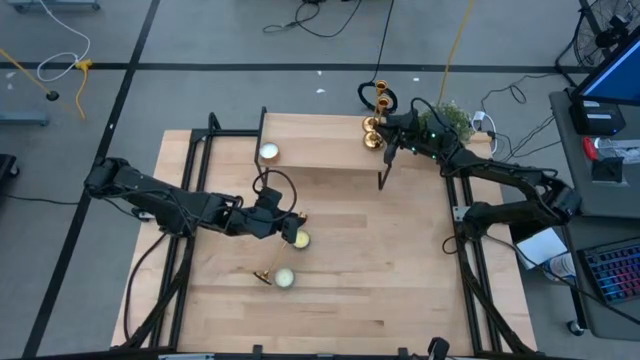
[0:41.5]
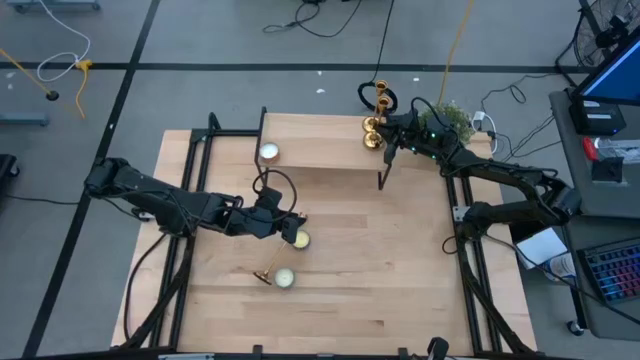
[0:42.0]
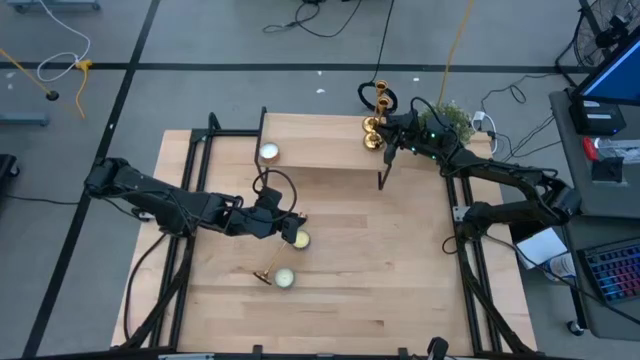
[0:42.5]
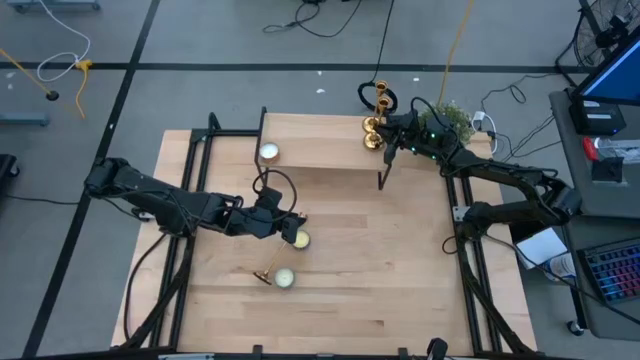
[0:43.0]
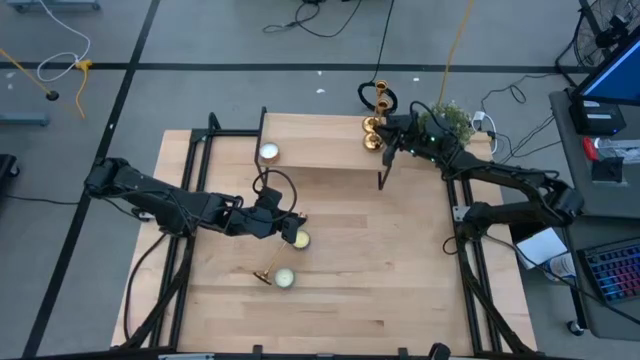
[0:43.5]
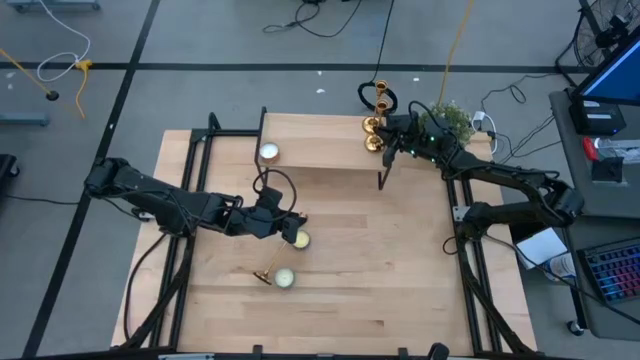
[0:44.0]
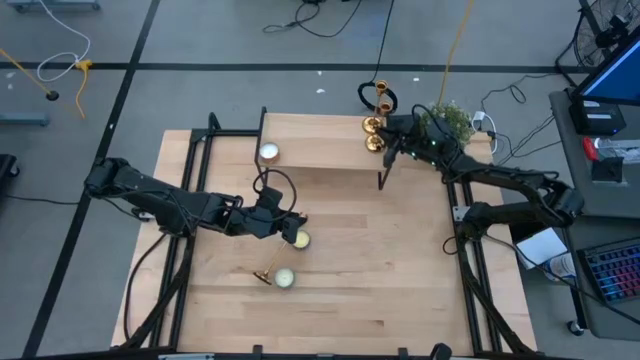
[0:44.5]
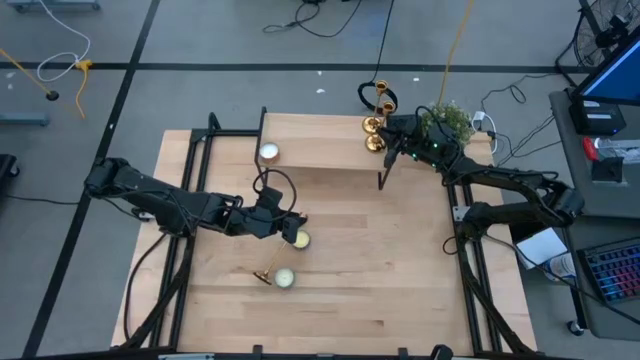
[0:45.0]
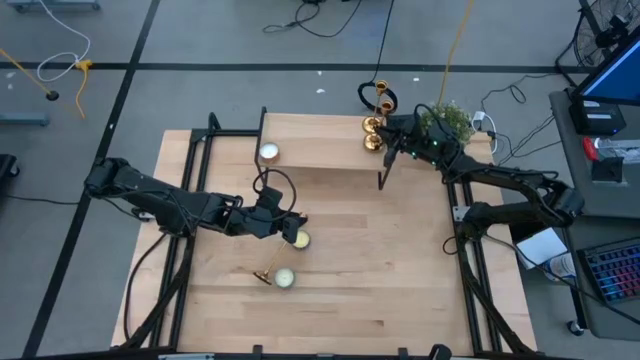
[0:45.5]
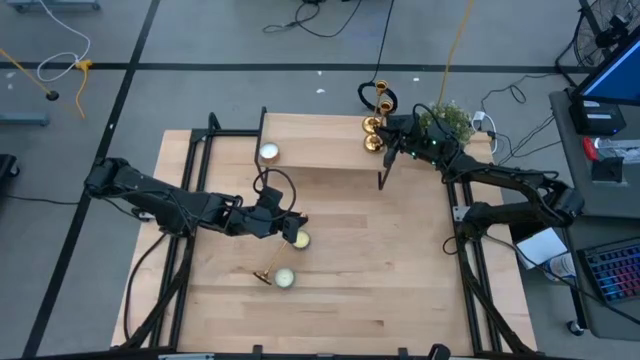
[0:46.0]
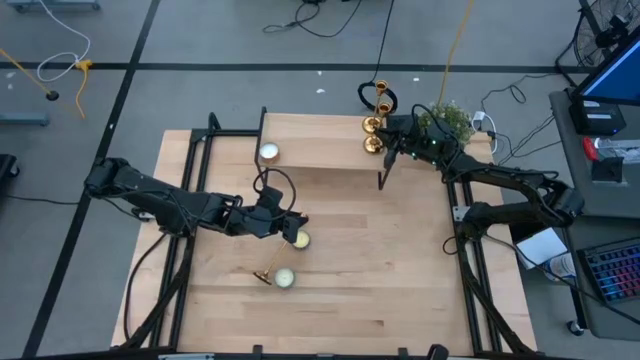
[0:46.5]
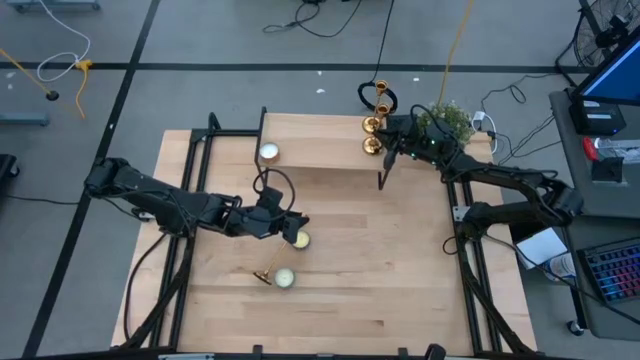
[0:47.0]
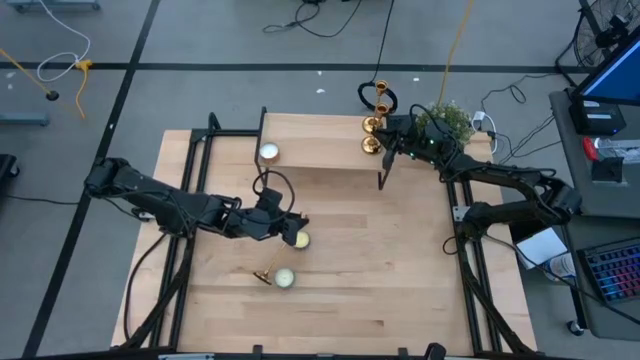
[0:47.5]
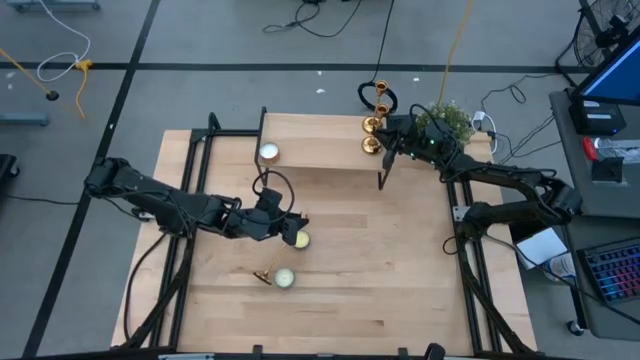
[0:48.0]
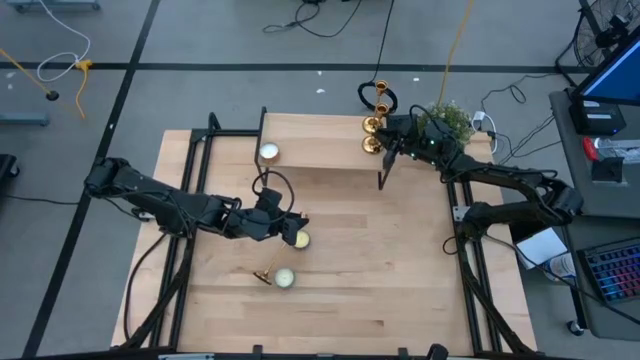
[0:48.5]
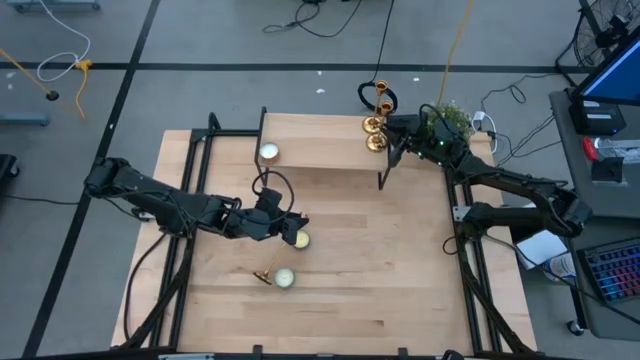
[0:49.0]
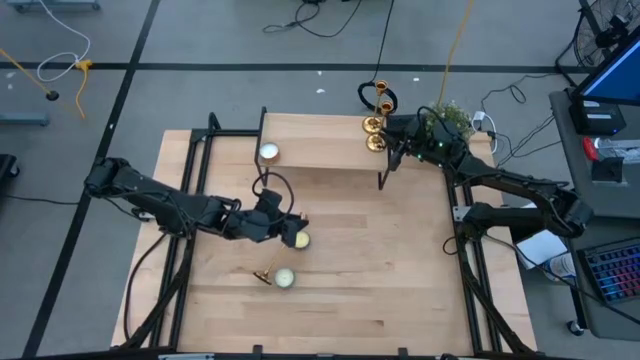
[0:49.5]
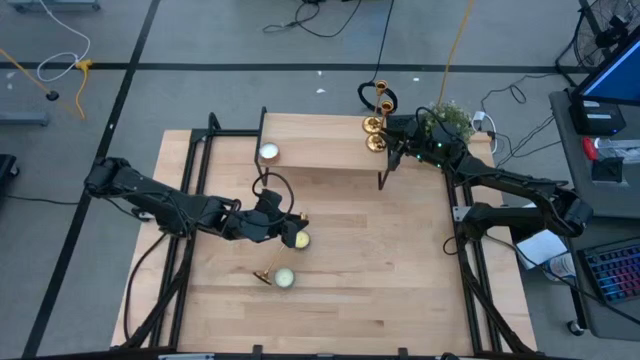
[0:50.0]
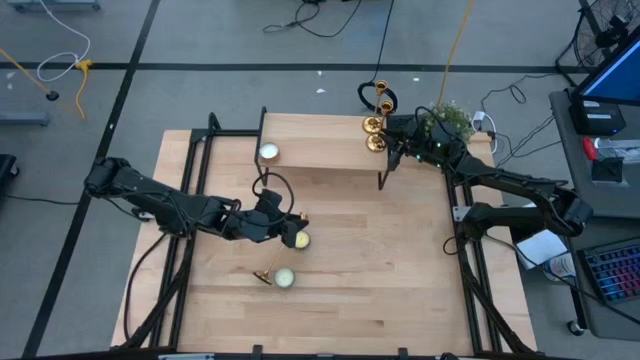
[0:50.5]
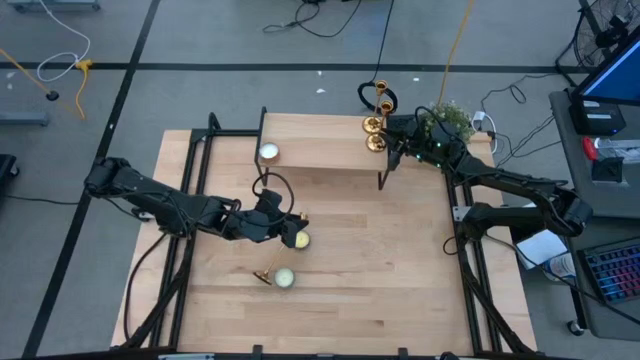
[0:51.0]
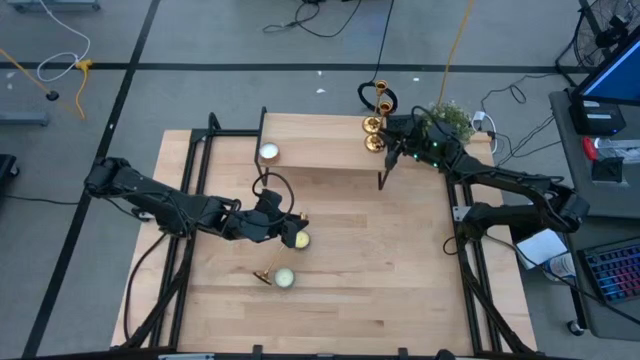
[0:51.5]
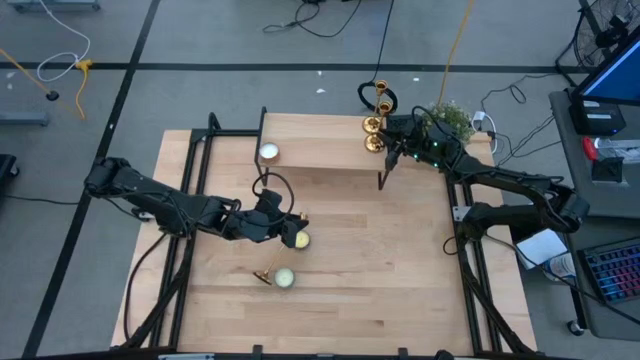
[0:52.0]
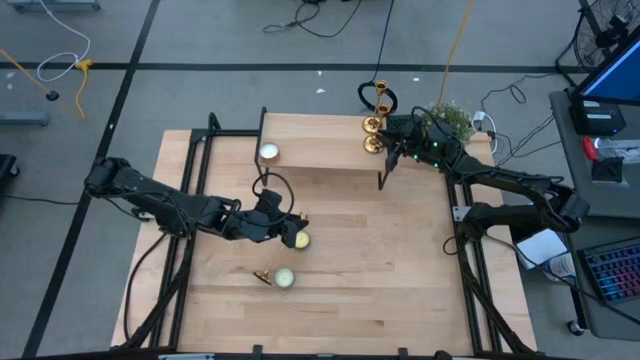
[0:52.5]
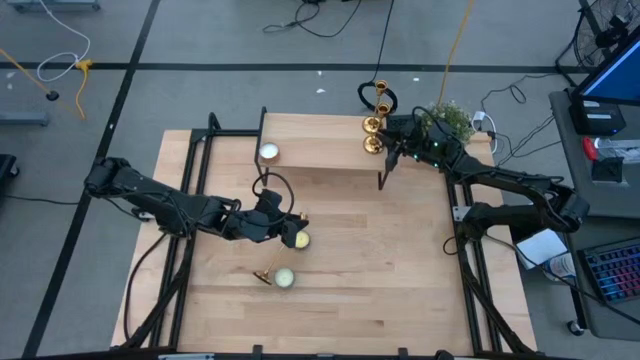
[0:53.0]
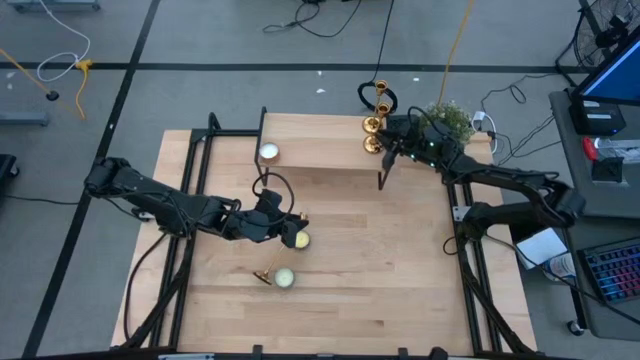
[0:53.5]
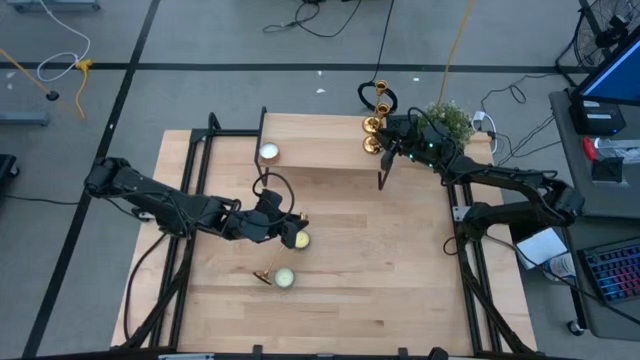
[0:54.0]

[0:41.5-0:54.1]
Task: Pick & Place candle stick holders
Put the right candle holder aligned with the other candle holder on the shelf

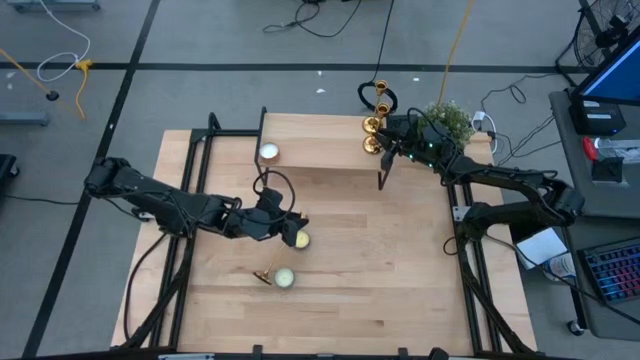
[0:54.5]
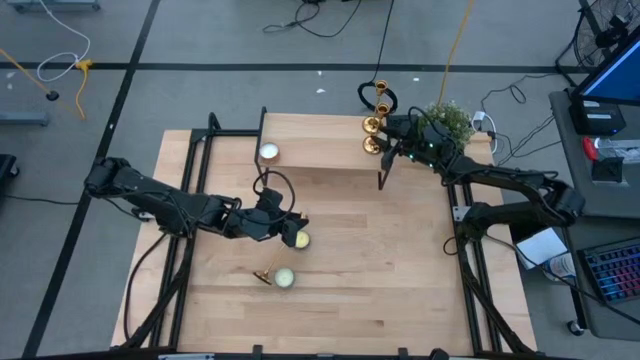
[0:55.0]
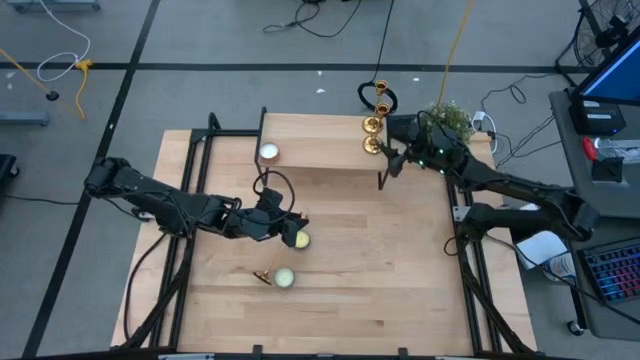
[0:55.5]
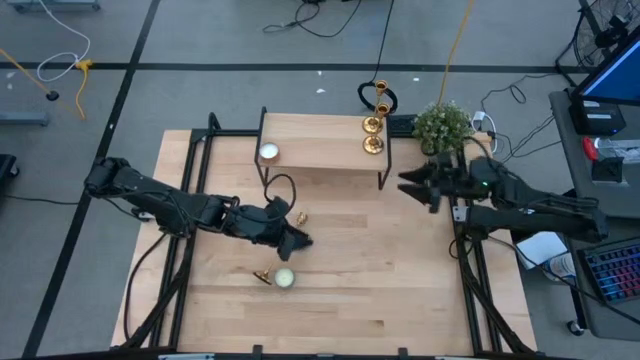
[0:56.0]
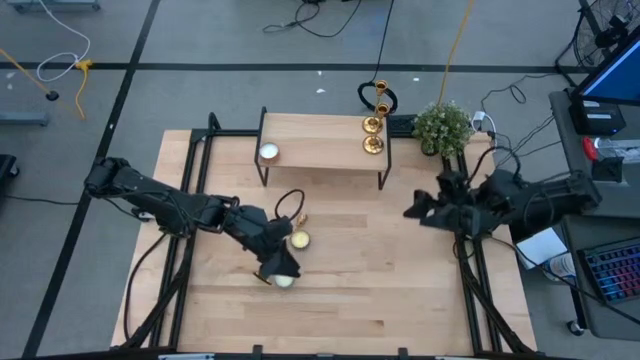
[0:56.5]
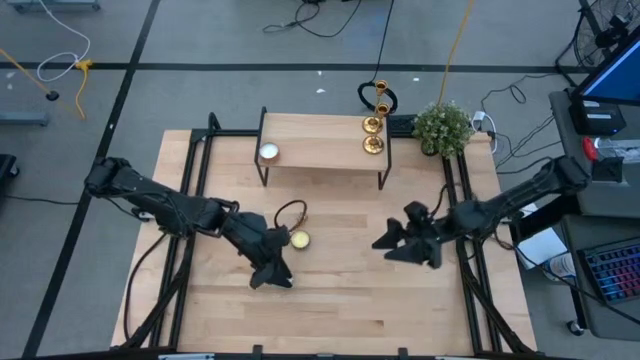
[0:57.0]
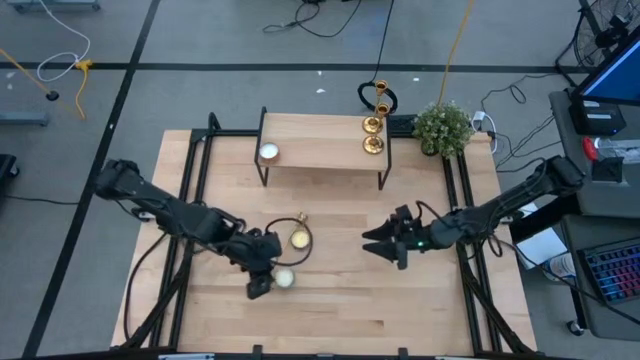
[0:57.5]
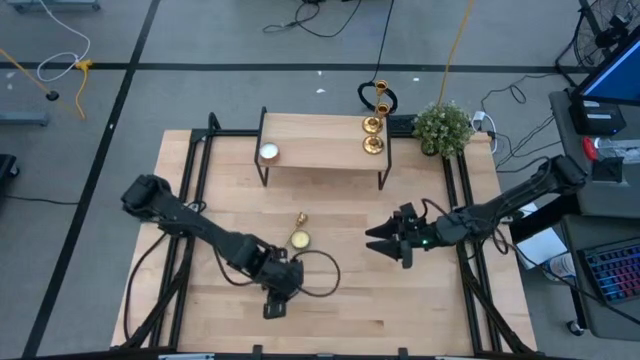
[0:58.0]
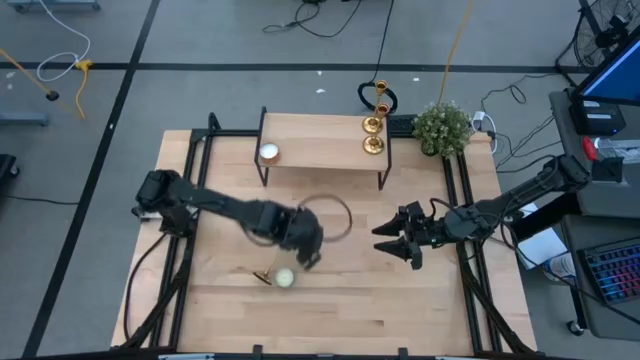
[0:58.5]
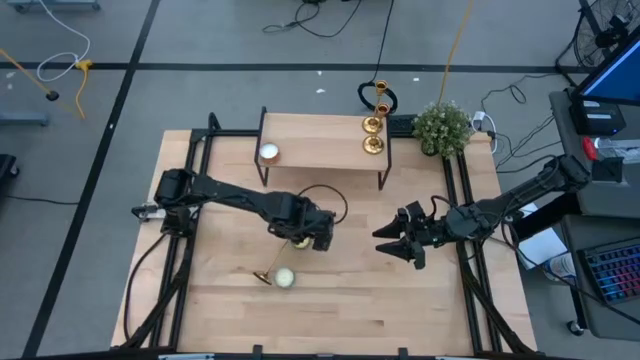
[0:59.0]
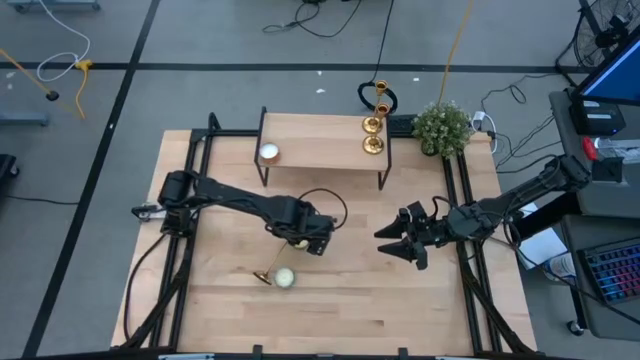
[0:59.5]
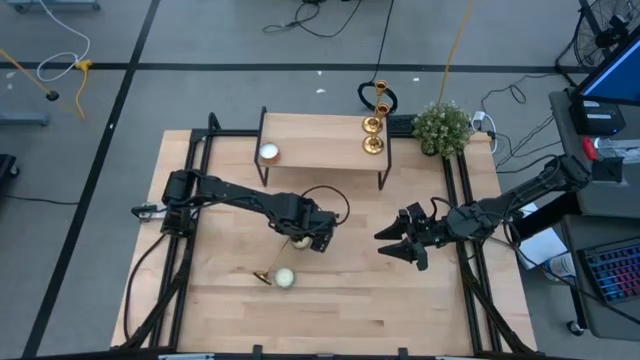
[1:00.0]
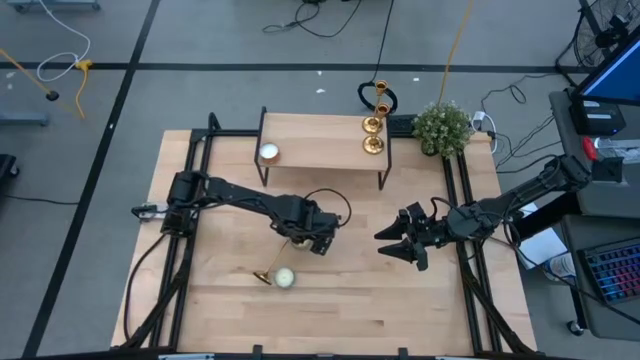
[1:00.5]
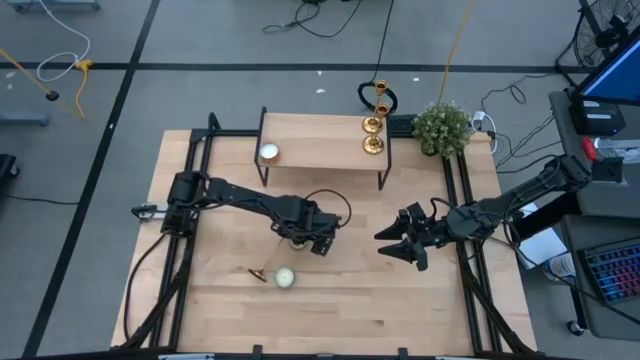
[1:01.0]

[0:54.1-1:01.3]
Put the black scented candle aligned with the orange scented candle on the shelf

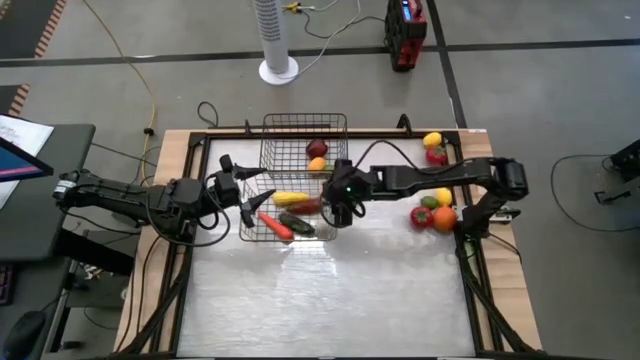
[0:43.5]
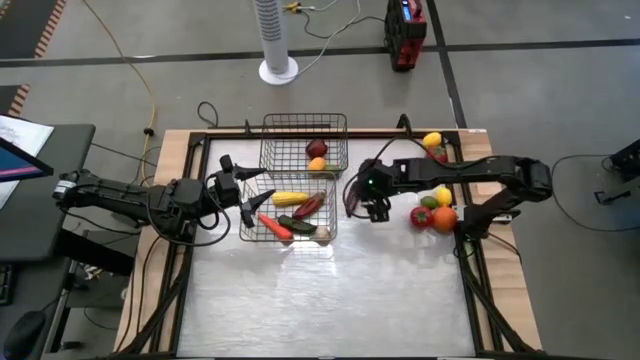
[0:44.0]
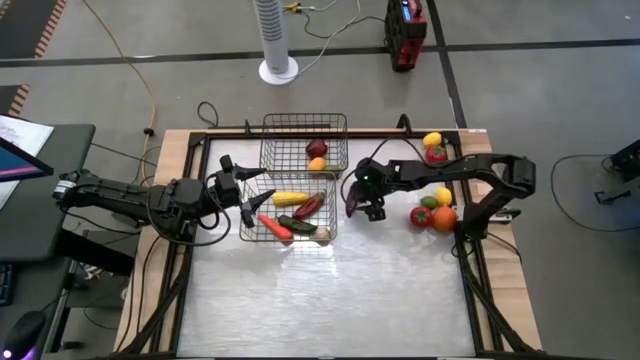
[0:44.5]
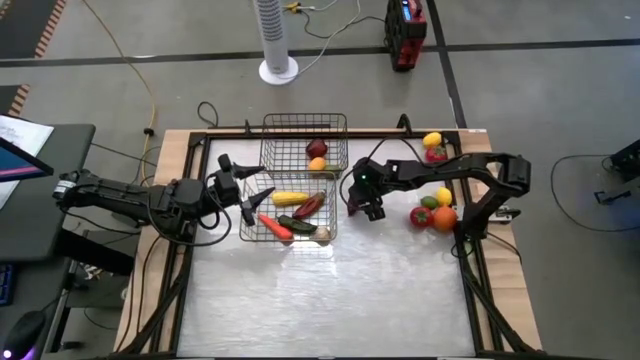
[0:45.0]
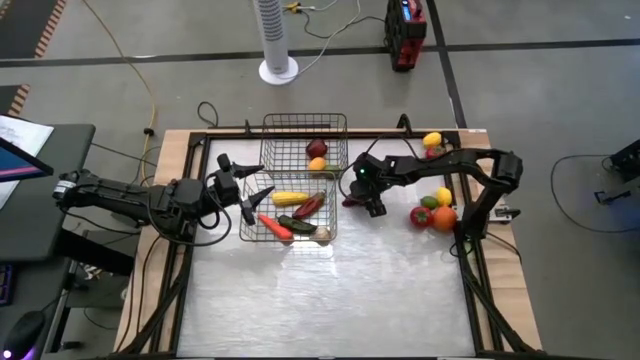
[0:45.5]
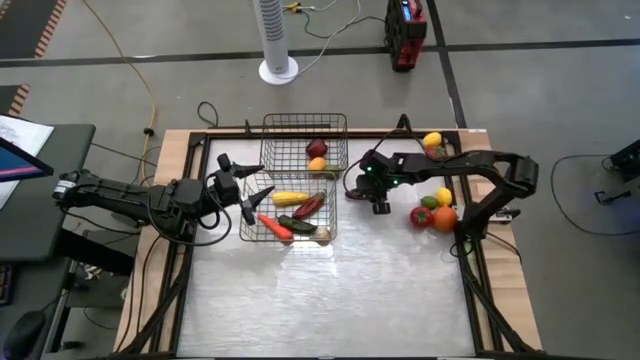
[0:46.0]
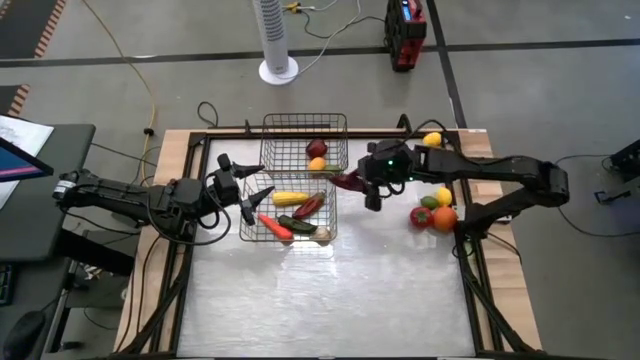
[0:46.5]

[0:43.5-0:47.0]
Task: Sort produce into baskets
Put the red chili pepper into the bottom wire basket
